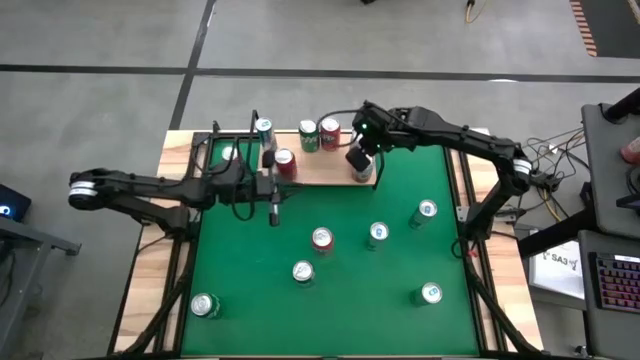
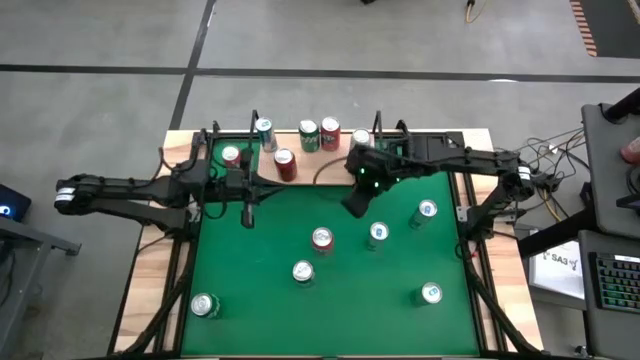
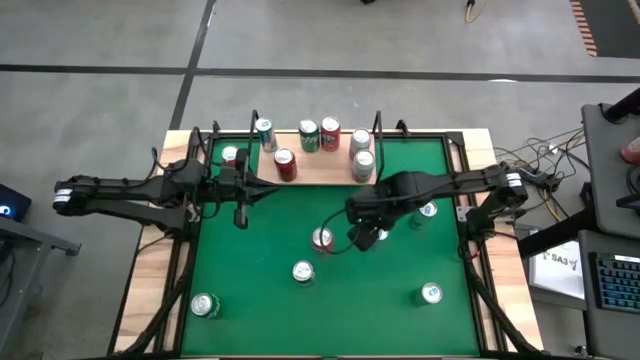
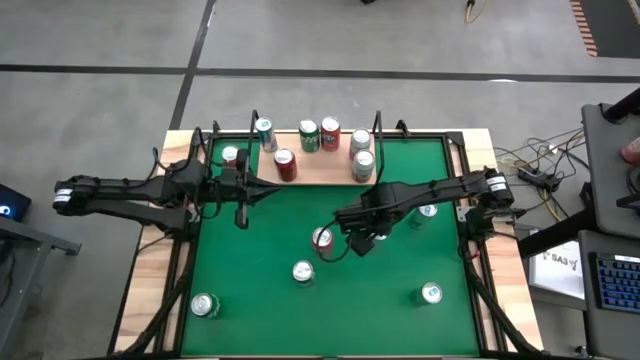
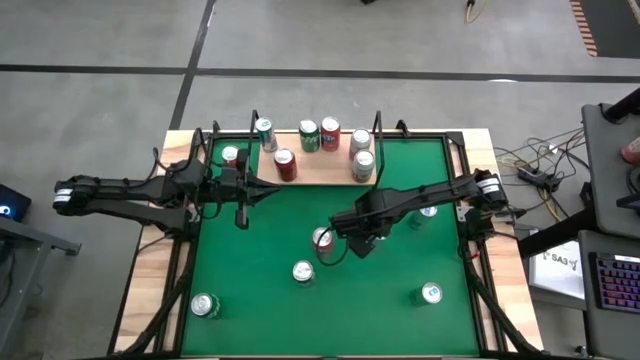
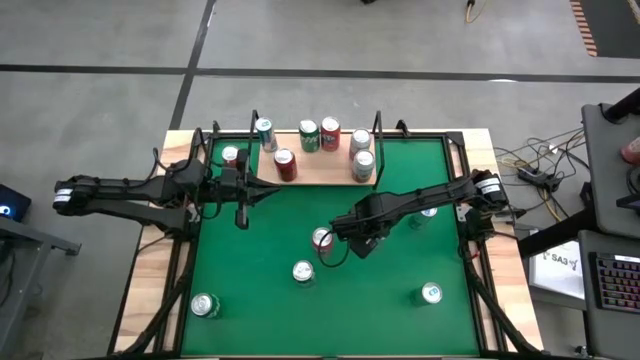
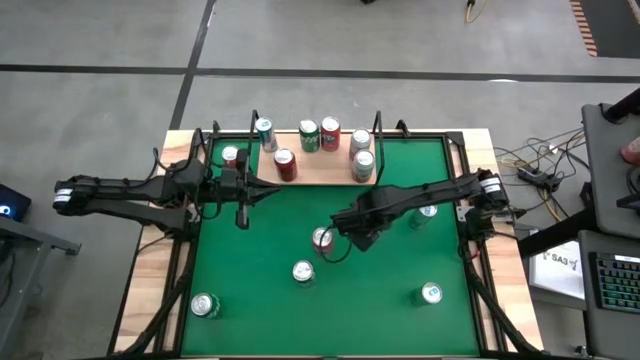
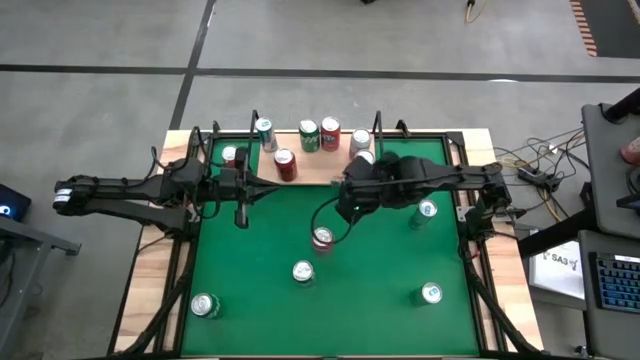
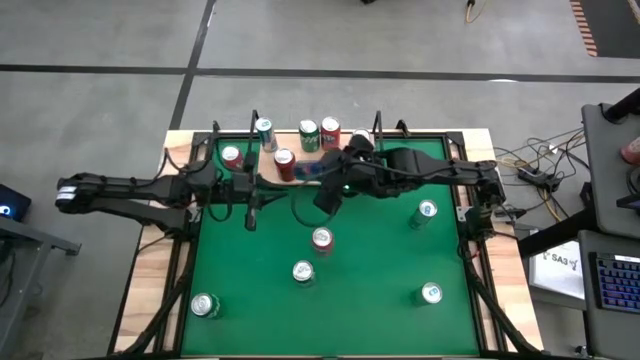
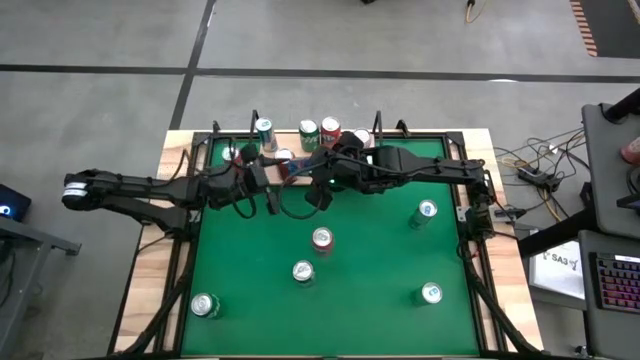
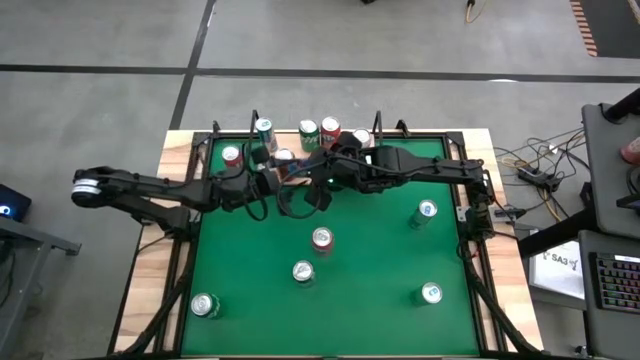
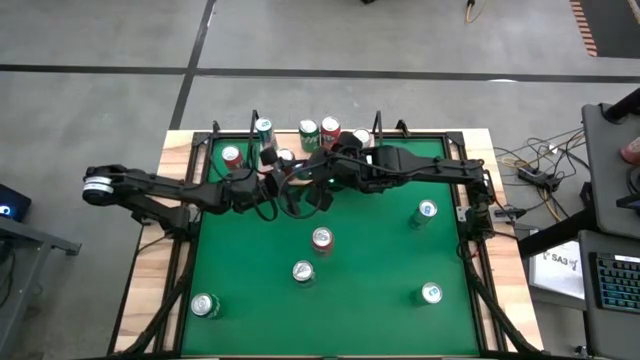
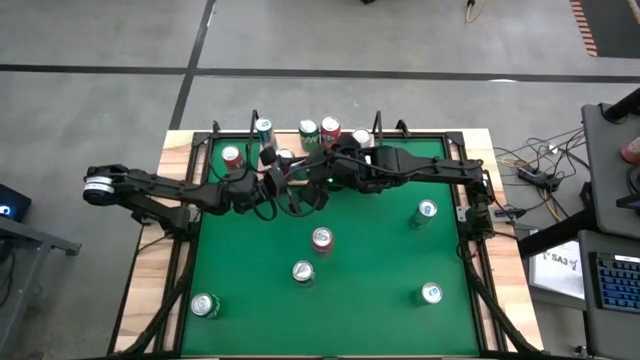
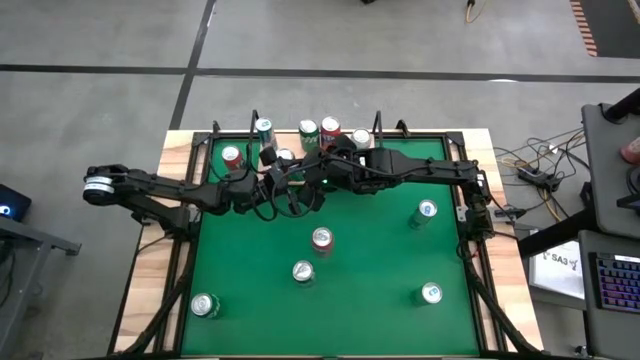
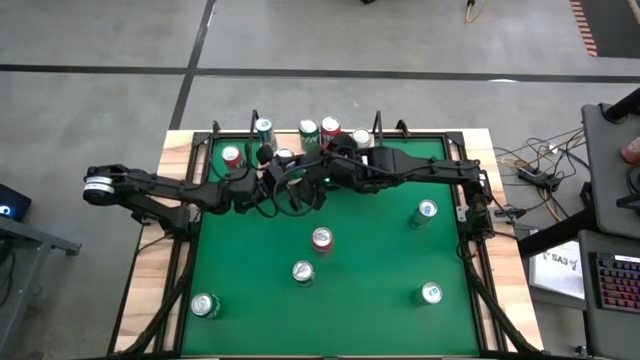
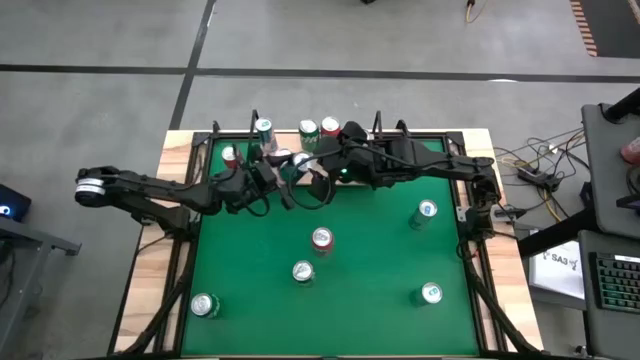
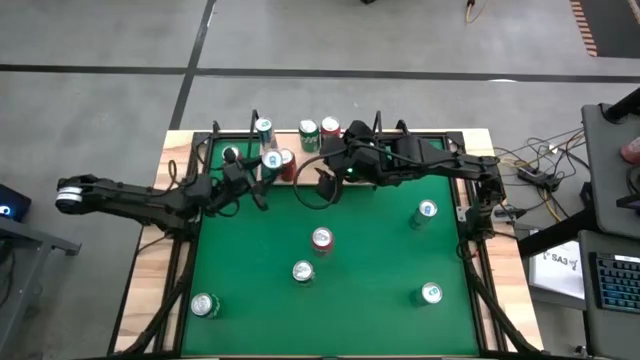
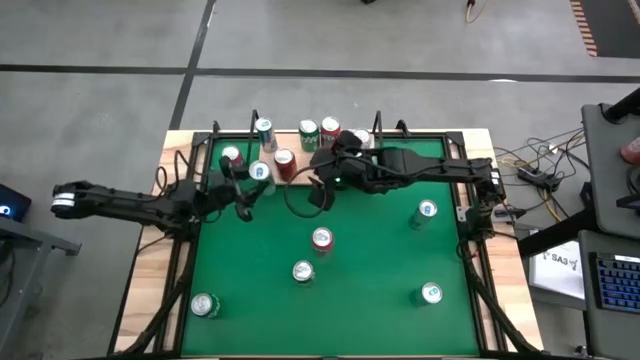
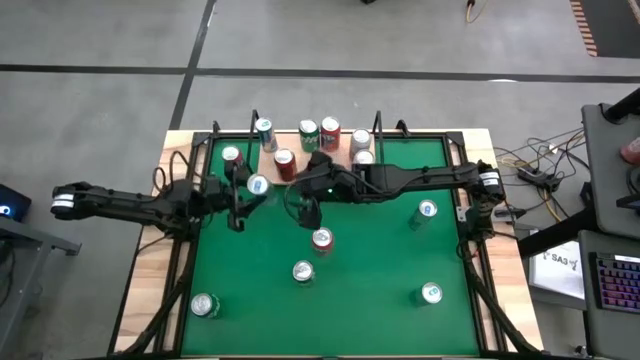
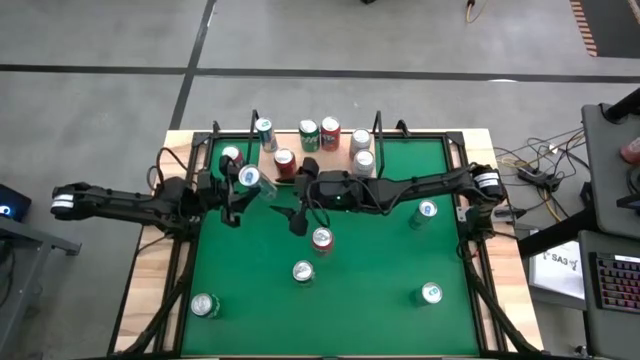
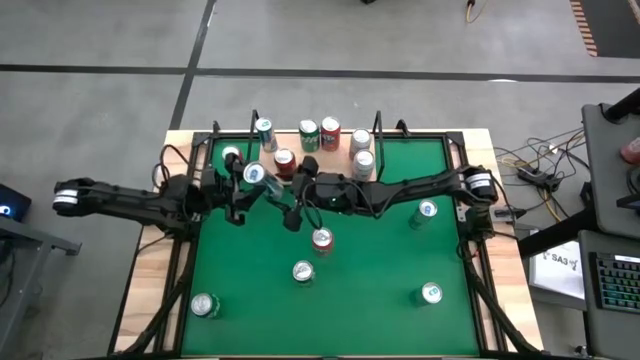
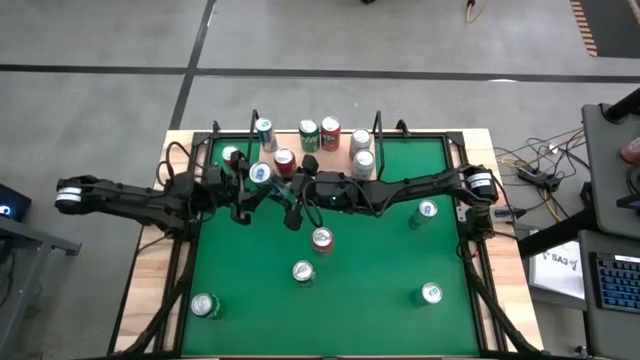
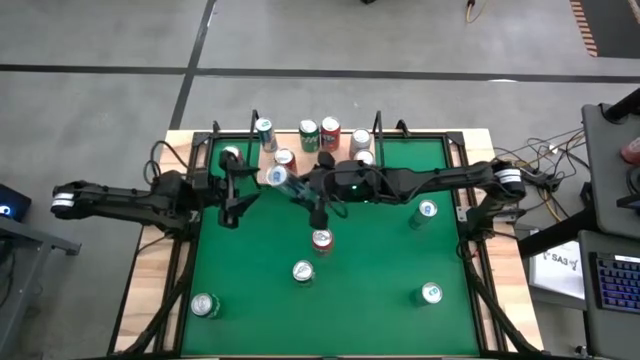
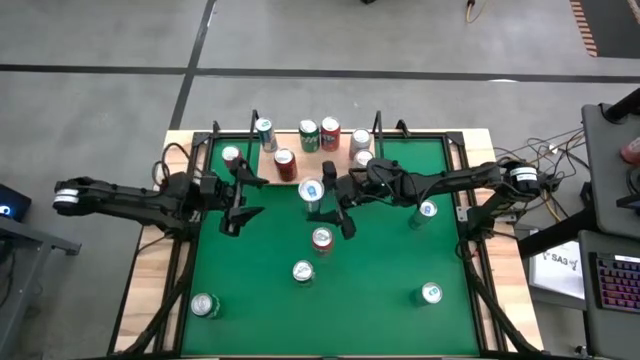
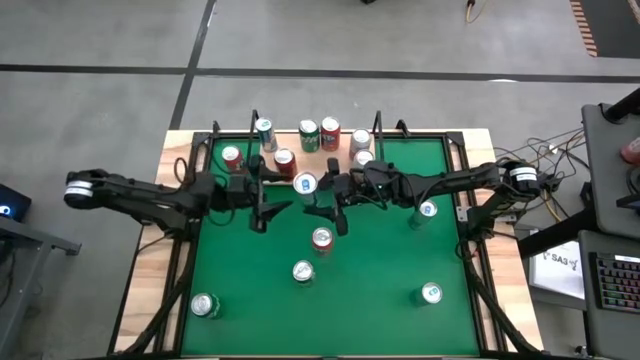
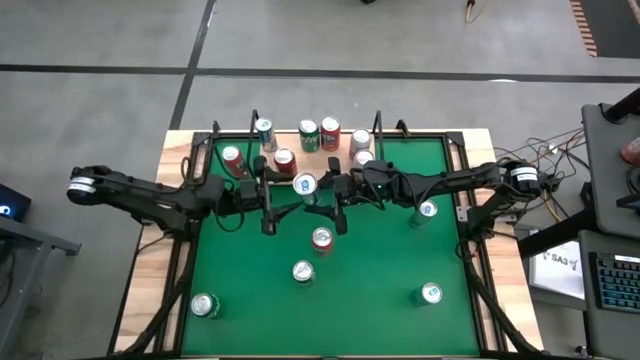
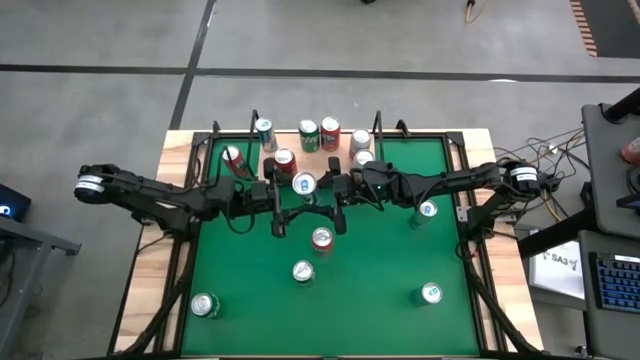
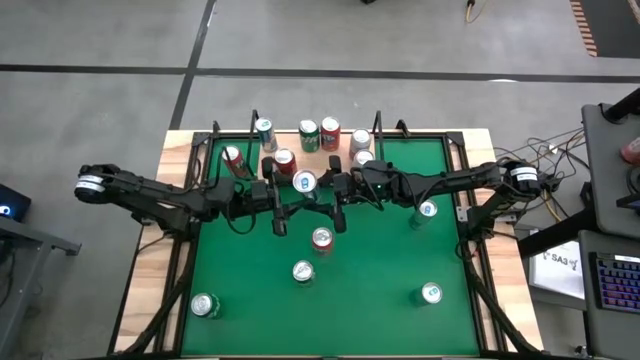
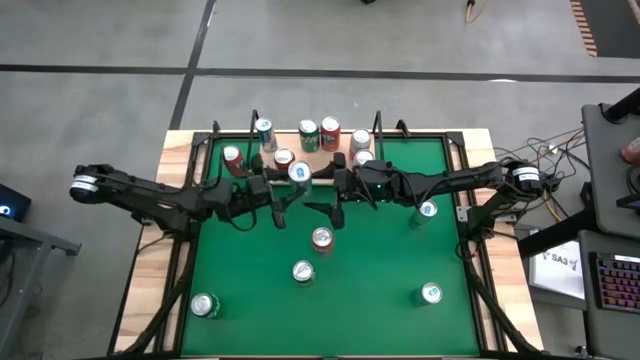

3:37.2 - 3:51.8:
Task: Pick and place cans onto a shelf
Put the top left blue silver soda can on the shelf aligned with the other blue silver soda can

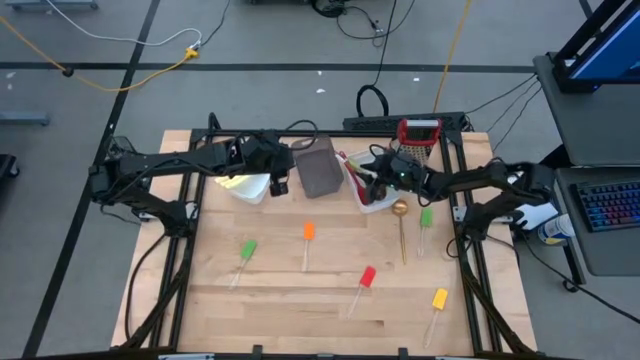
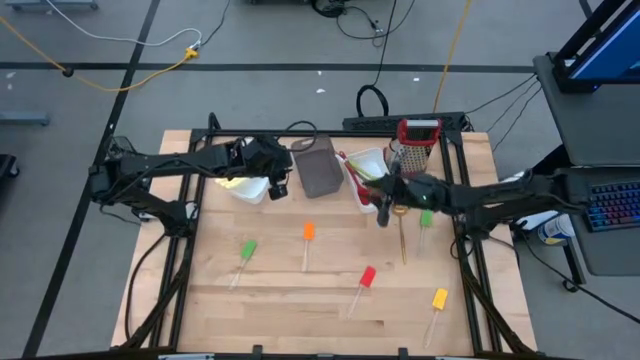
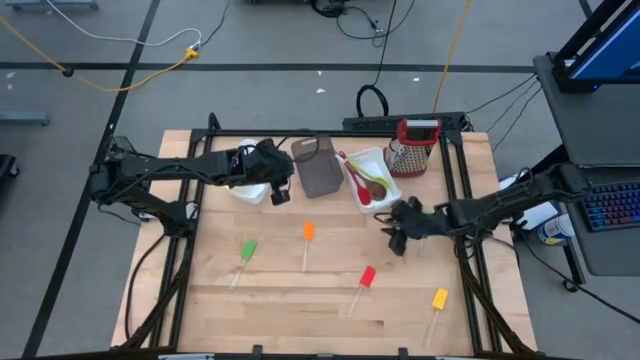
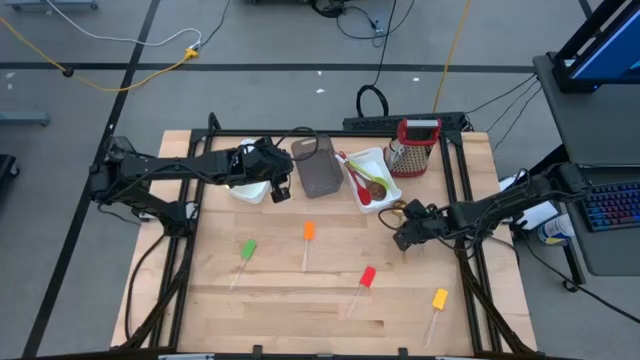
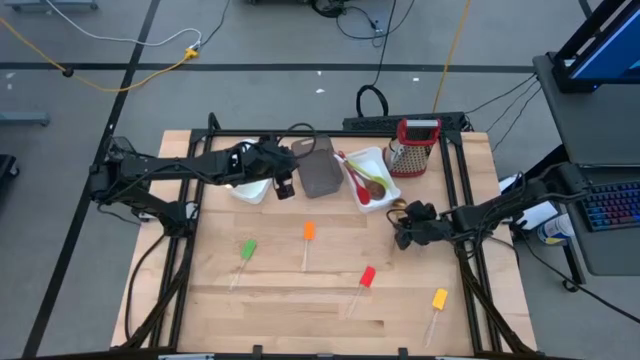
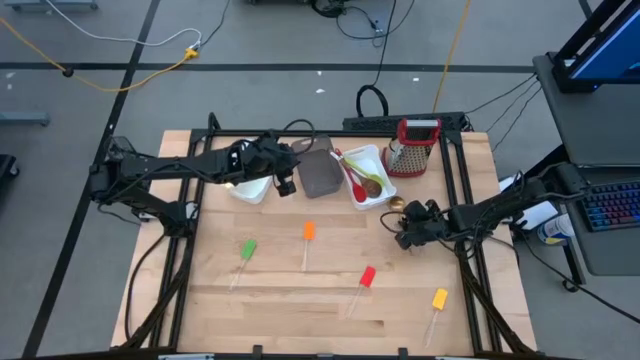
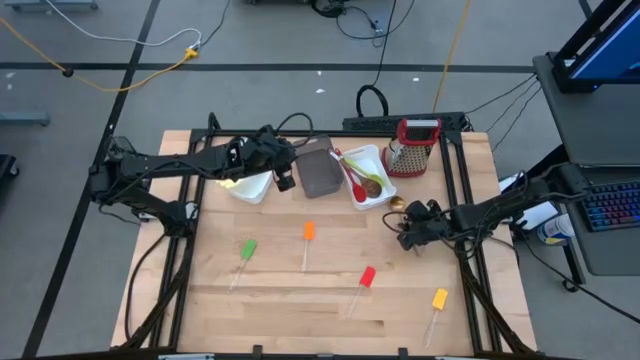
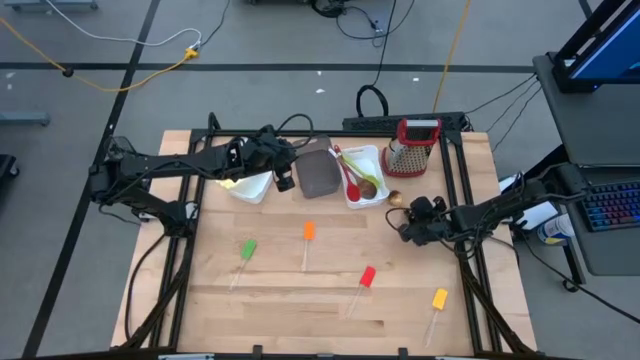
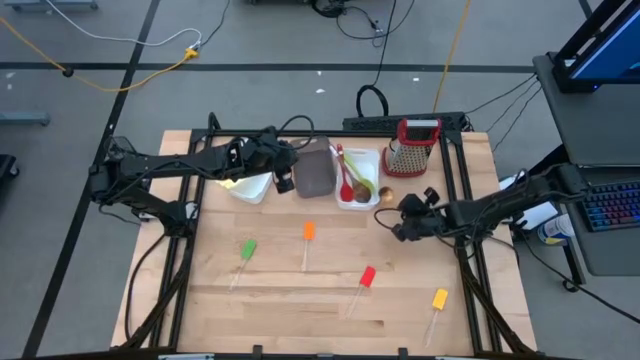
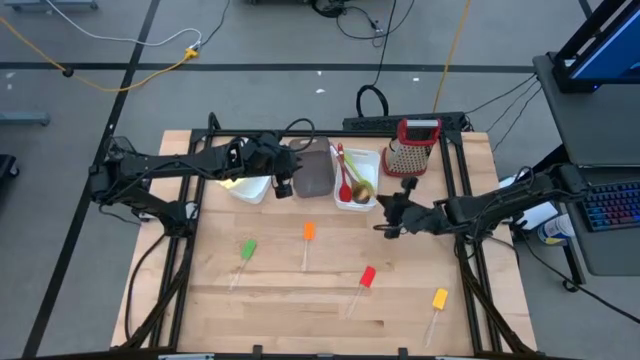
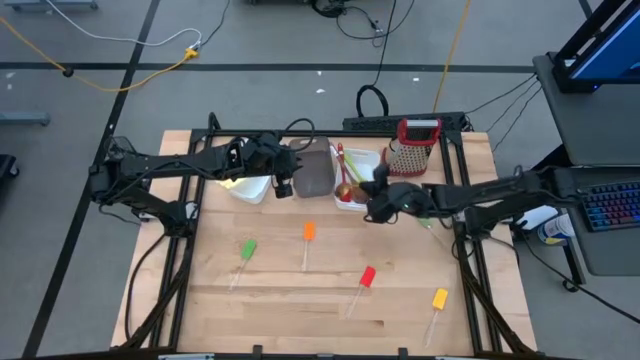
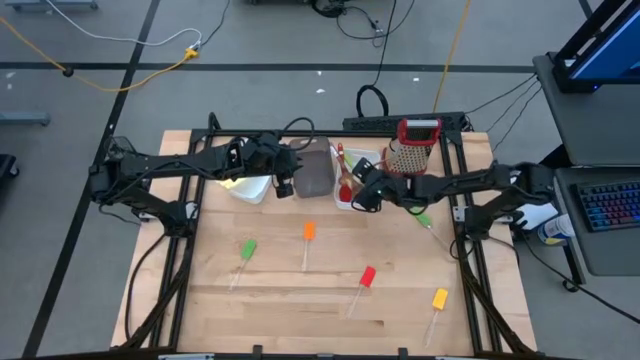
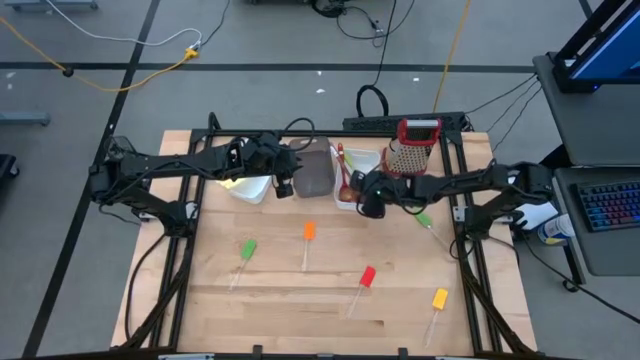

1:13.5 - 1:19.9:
Task: Pick & Place Kitchen Items
Put the golden slotted spoon into the right white bin
